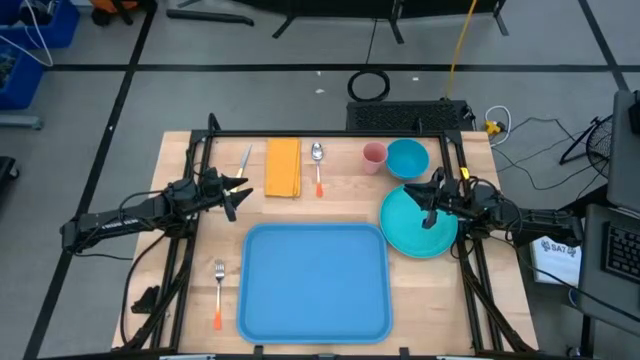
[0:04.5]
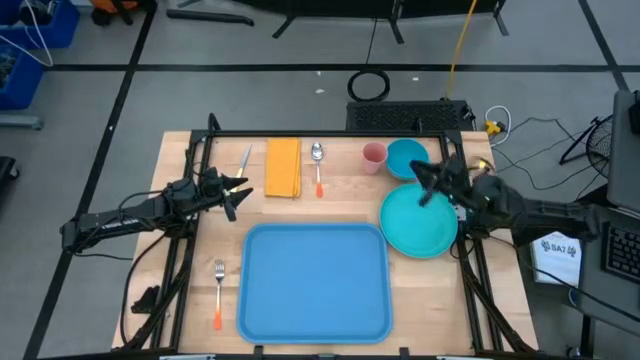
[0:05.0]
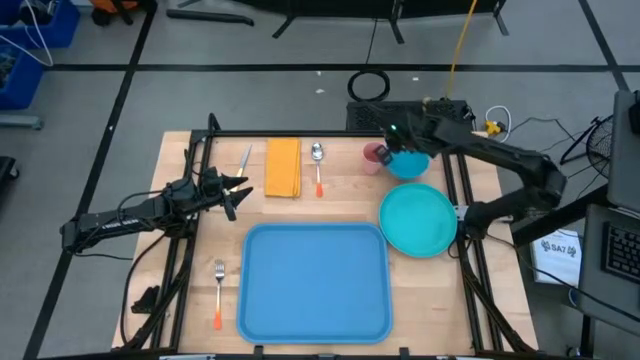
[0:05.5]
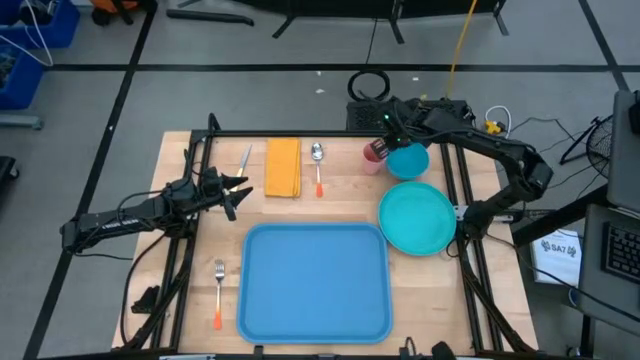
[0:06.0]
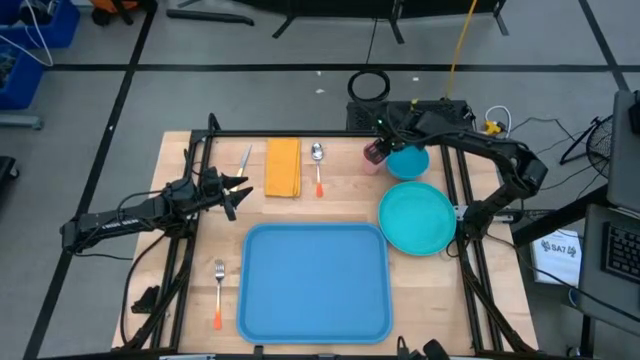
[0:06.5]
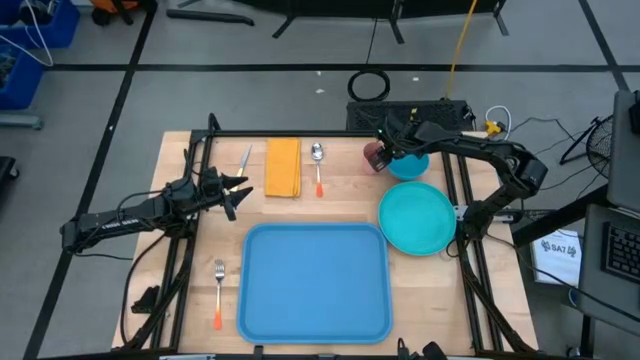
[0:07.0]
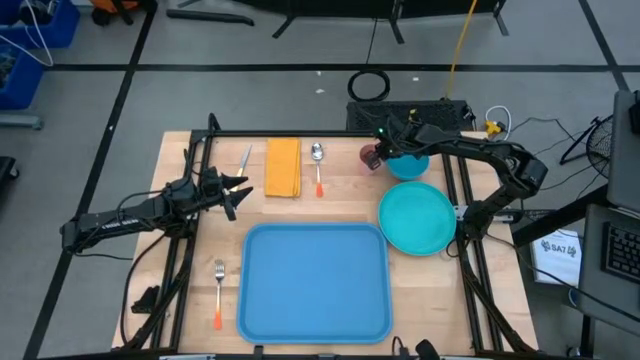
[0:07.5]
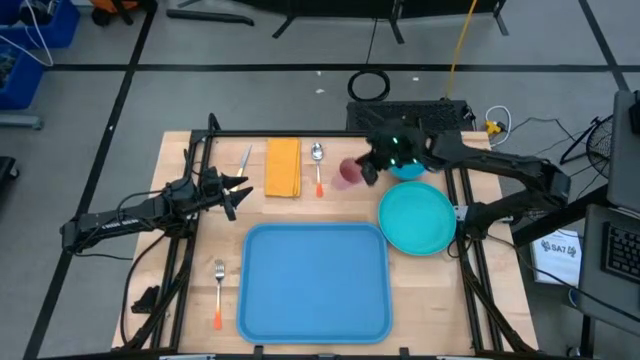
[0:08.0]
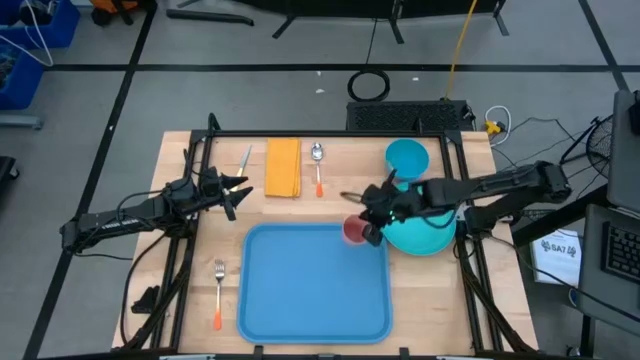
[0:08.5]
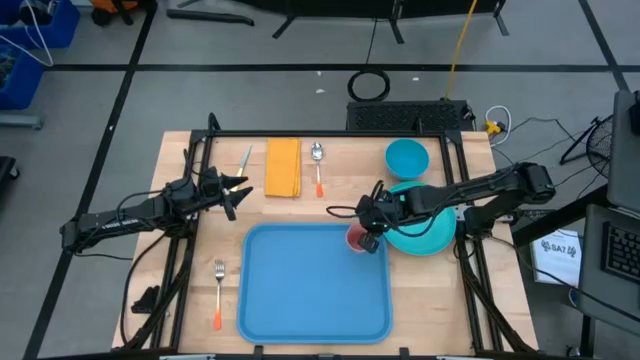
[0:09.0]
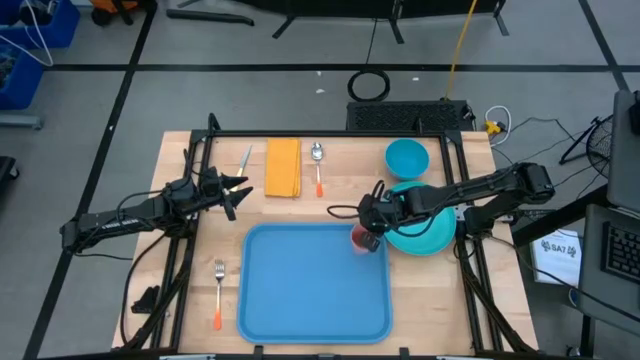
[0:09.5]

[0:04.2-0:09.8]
Task: Set up tray
Put the pink cup on the blue serving tray

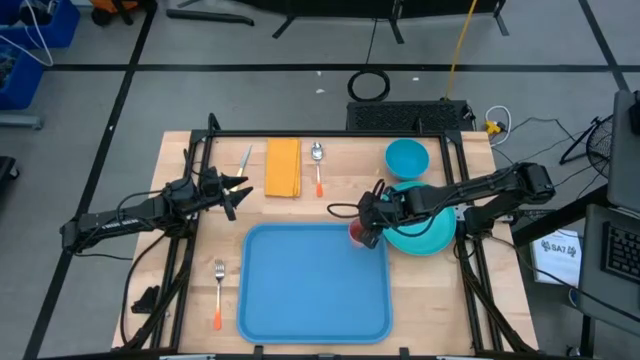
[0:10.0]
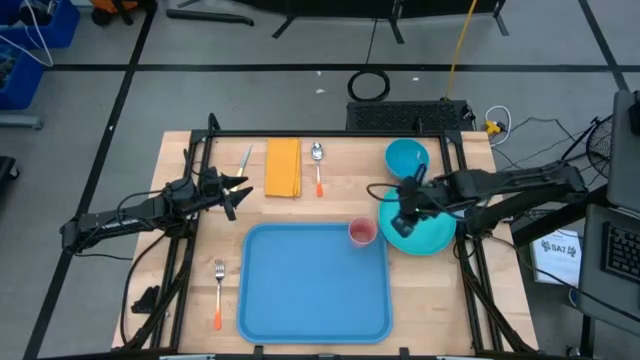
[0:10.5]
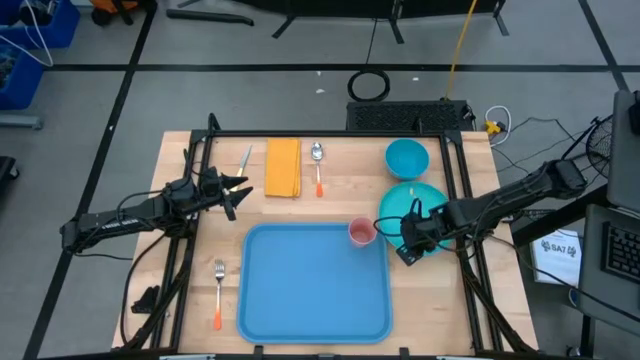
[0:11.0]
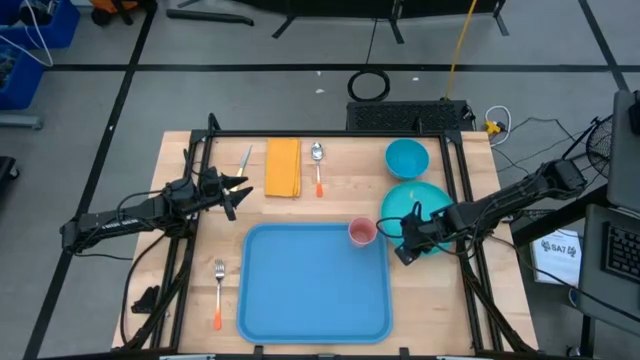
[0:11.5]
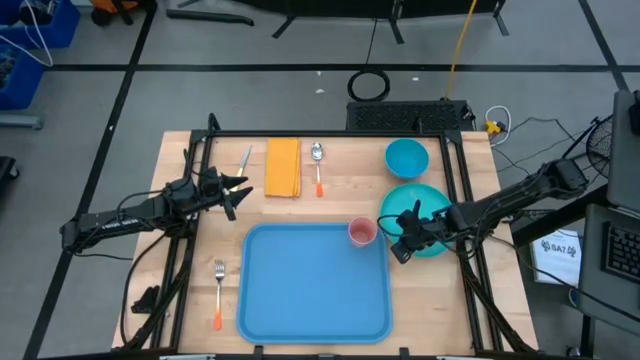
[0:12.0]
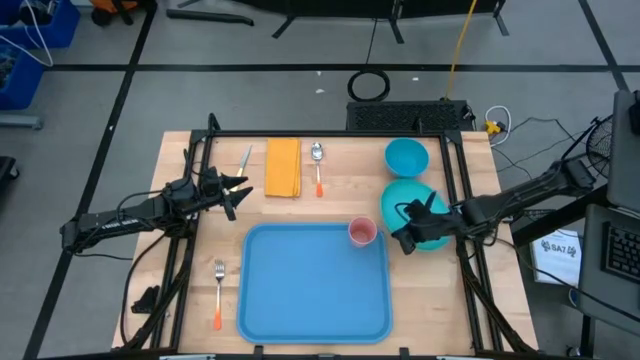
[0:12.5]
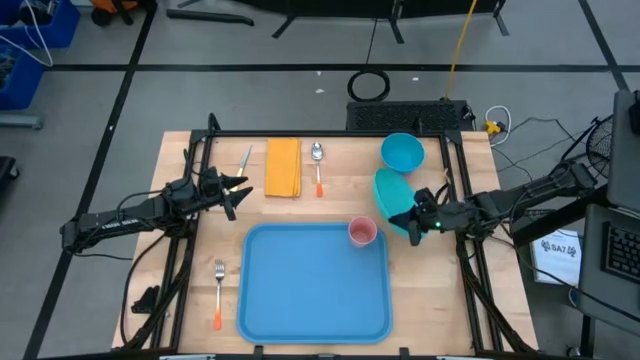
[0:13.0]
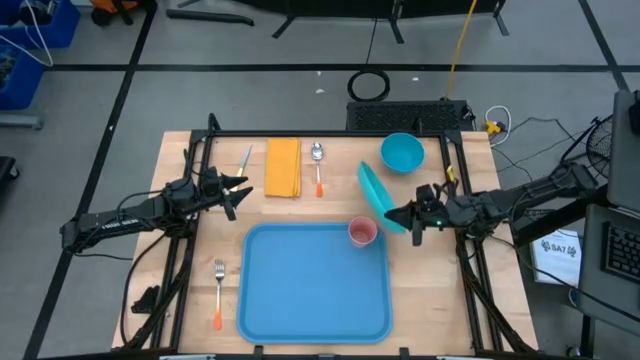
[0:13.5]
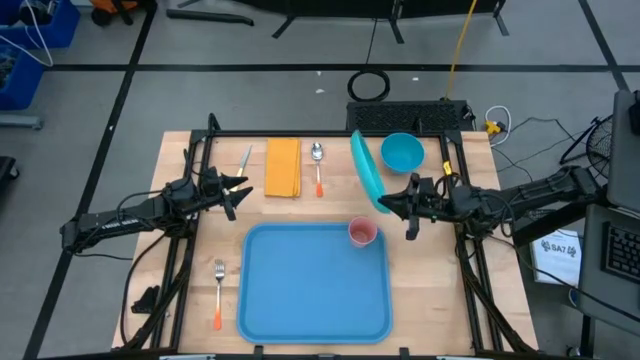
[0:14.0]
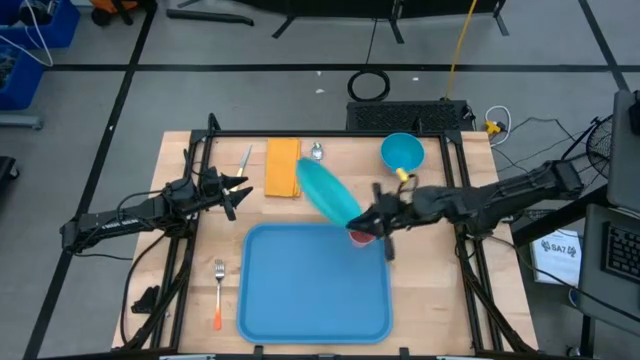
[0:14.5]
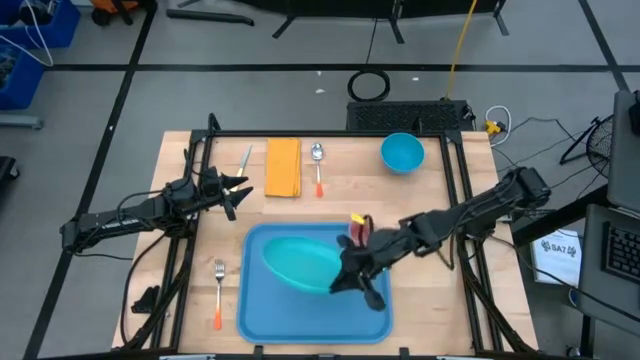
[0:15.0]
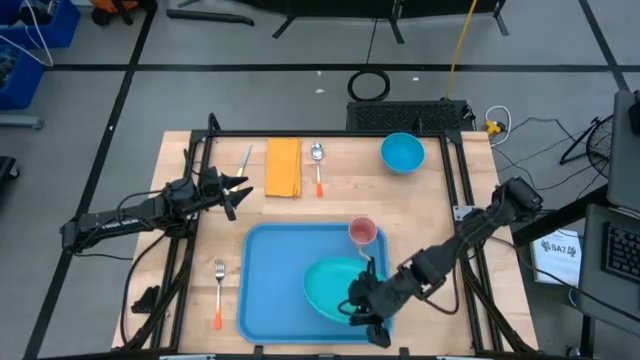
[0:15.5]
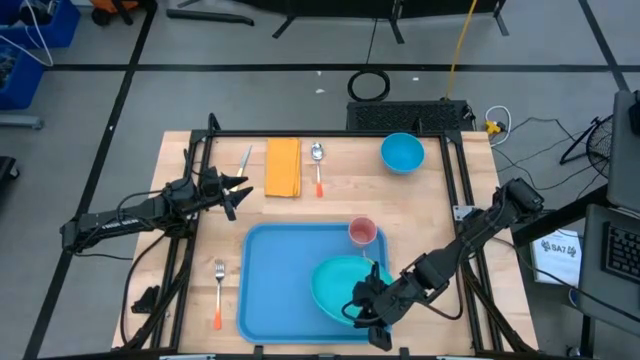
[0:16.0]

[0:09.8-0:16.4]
Put the light blue plate on the blue serving tray to the bottom of the pink cup

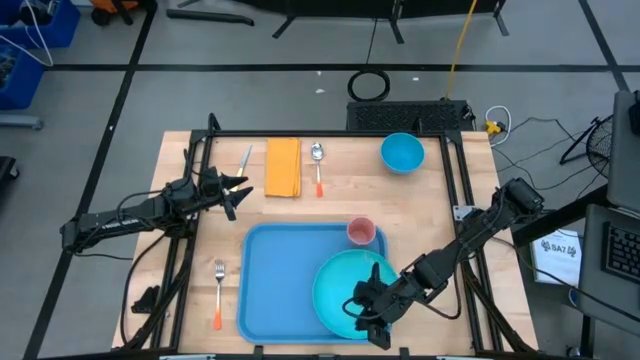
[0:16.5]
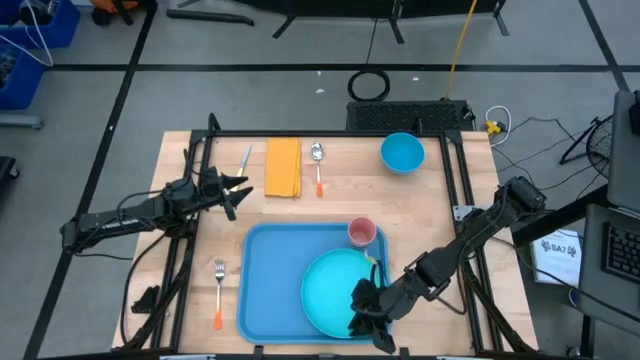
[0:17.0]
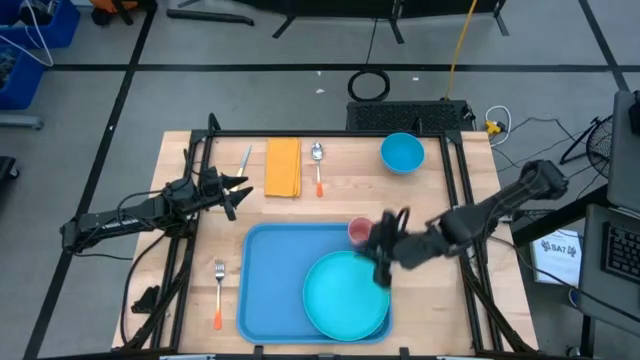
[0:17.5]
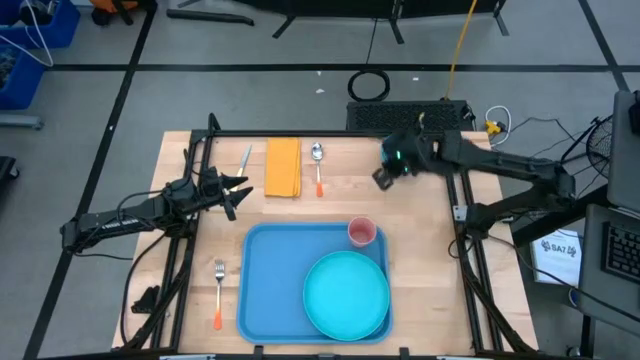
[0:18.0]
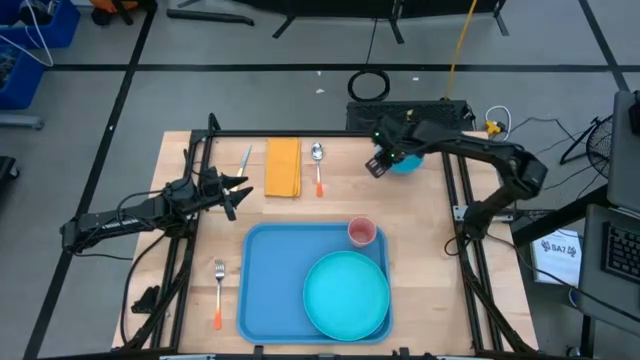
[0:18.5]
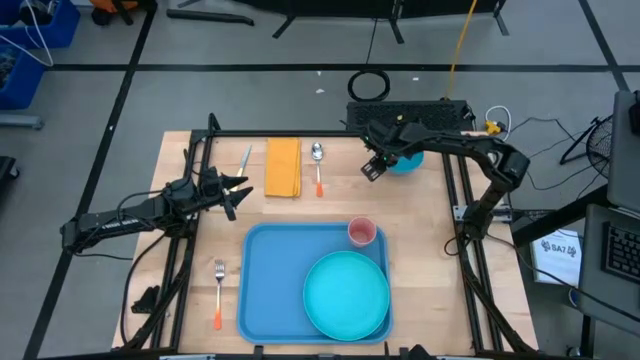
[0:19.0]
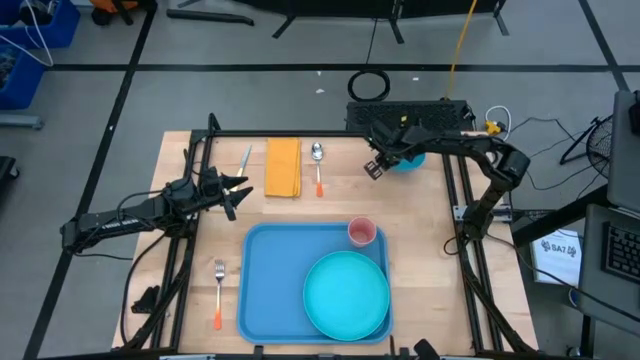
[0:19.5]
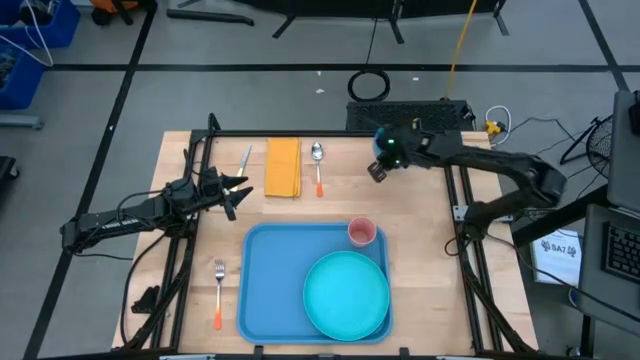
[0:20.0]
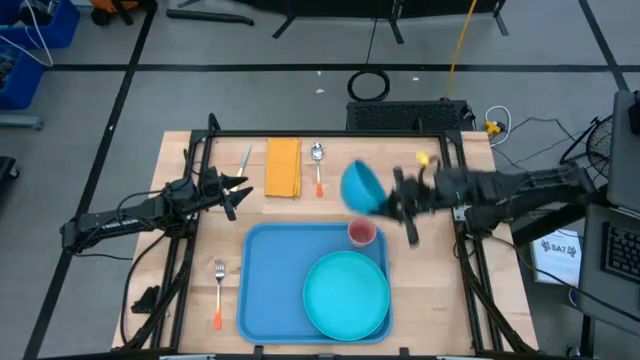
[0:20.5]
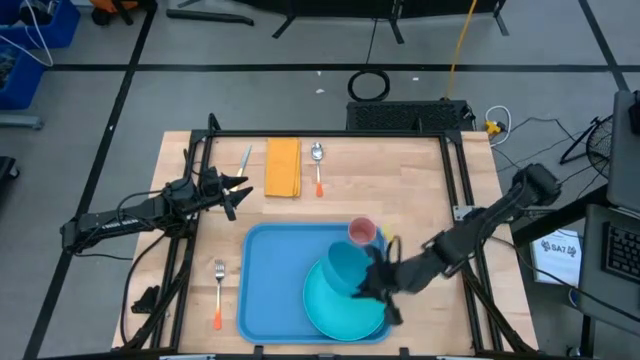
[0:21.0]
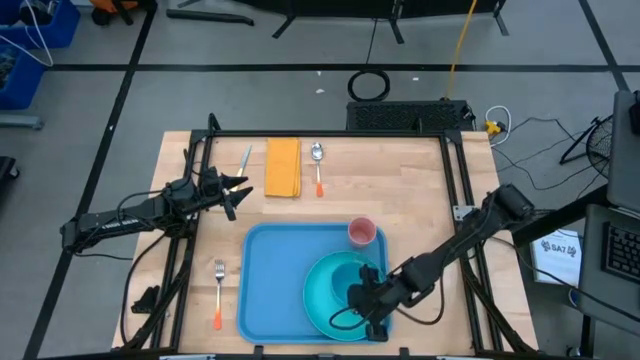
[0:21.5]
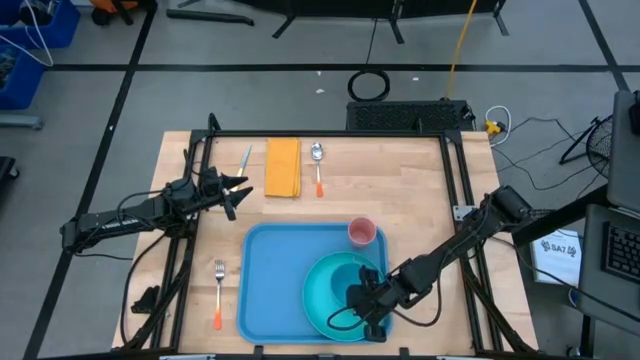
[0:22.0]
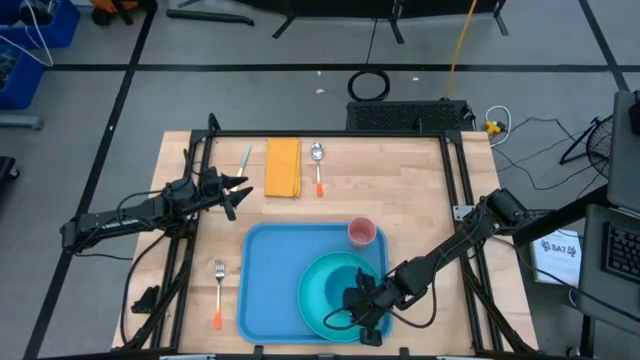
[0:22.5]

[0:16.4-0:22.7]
Put the blue bowl on top of the light blue plate

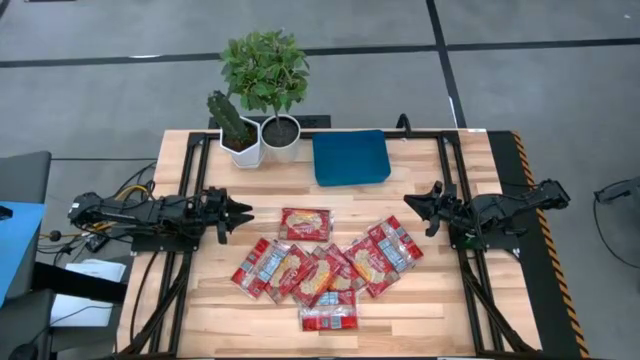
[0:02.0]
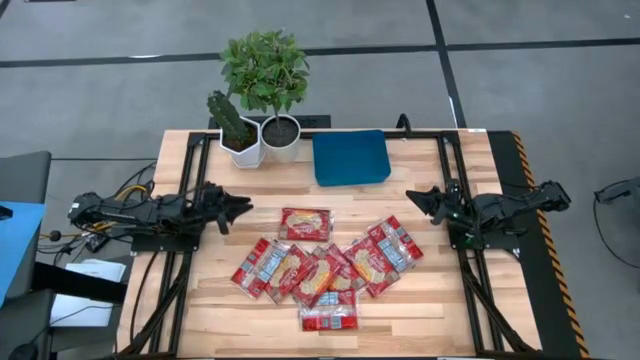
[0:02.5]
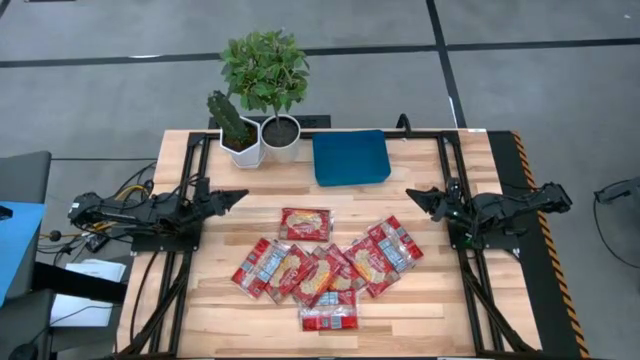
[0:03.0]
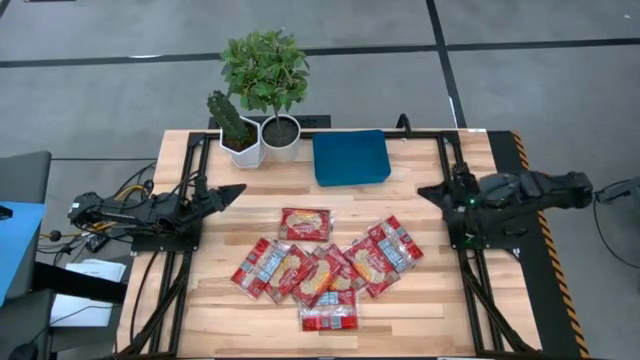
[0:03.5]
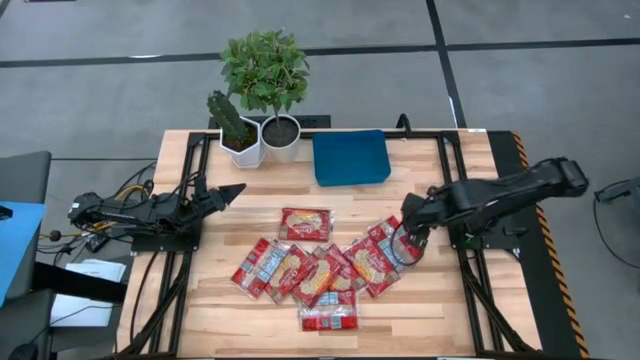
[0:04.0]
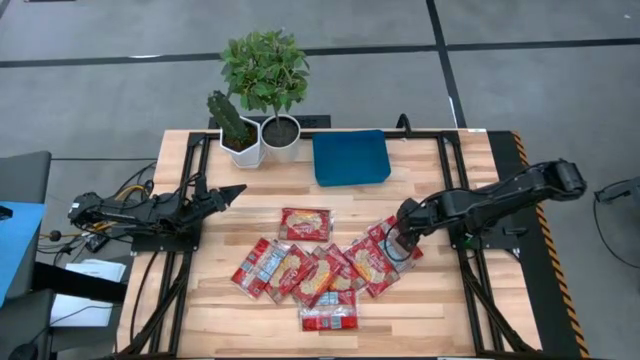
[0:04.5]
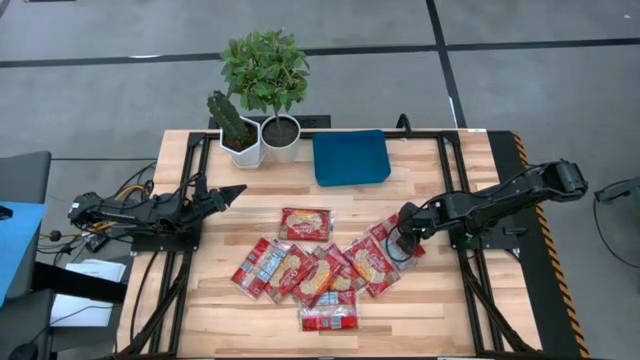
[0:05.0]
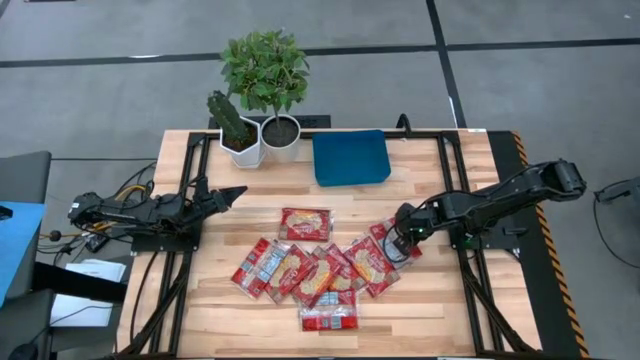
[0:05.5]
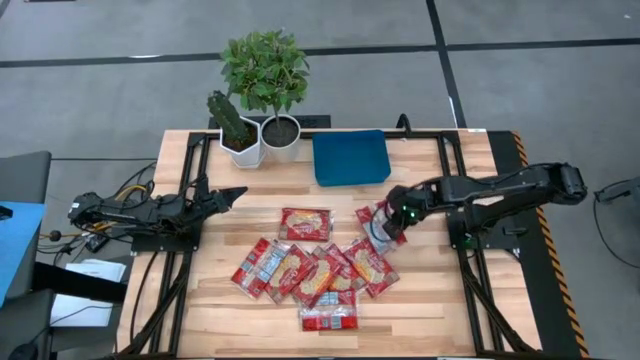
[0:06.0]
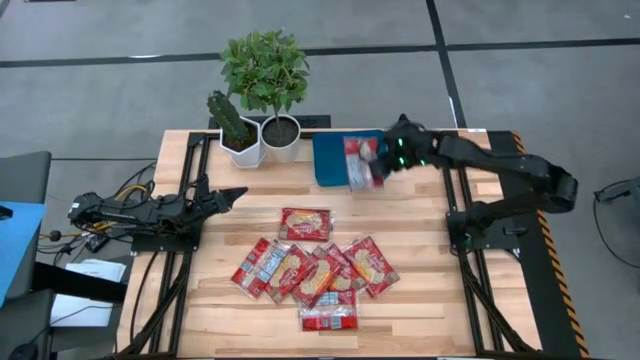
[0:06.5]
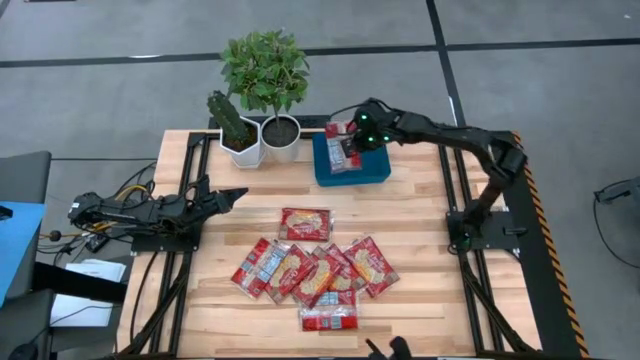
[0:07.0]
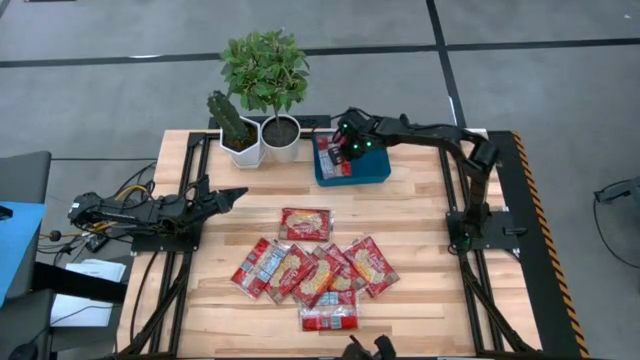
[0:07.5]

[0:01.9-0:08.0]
Task: Sort popcorn bags into baskets
Put the red popcorn bag into the blue container
